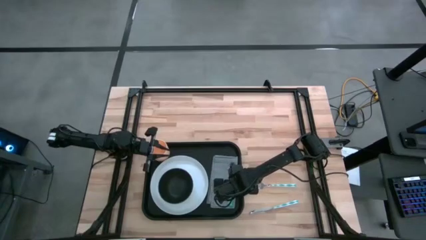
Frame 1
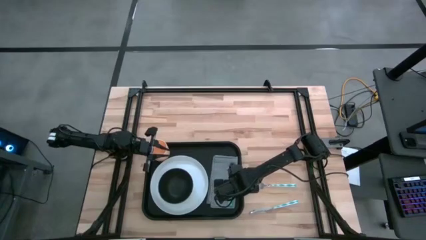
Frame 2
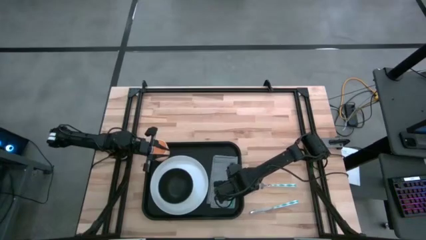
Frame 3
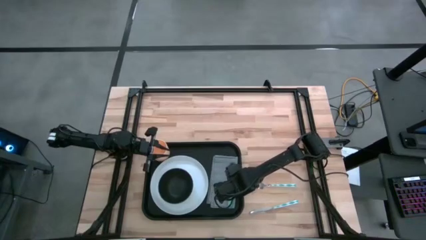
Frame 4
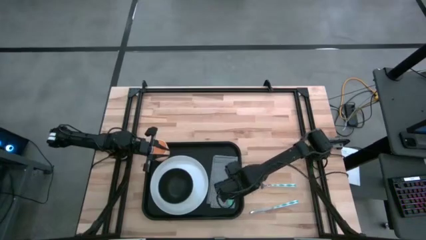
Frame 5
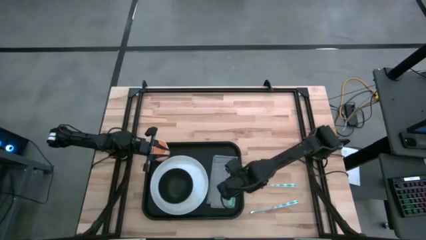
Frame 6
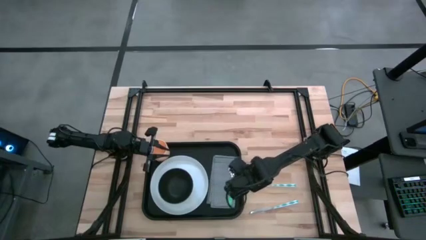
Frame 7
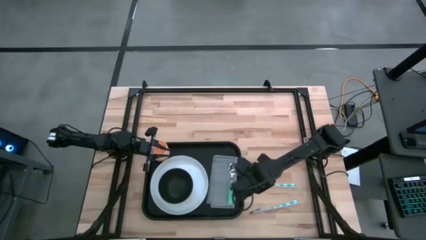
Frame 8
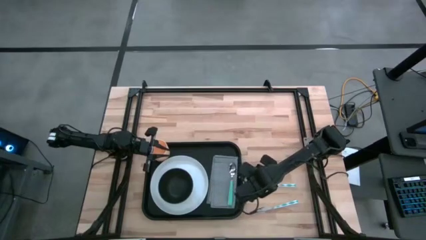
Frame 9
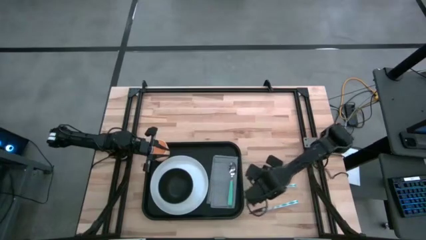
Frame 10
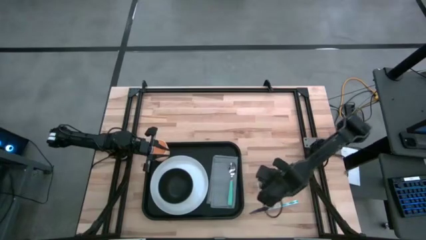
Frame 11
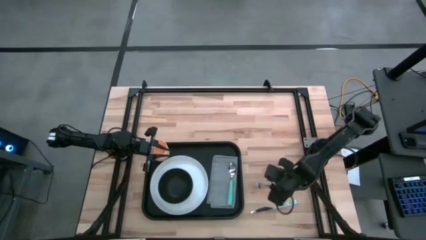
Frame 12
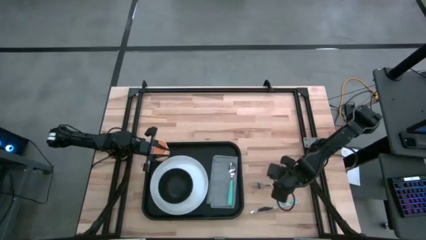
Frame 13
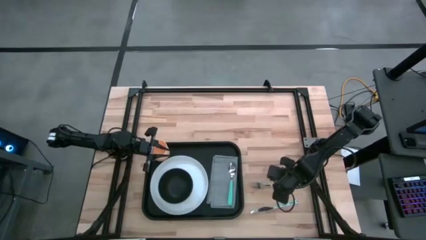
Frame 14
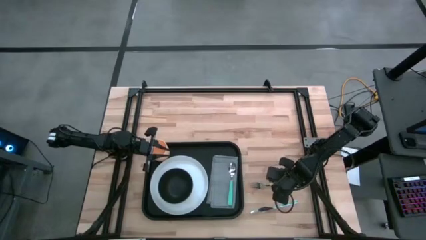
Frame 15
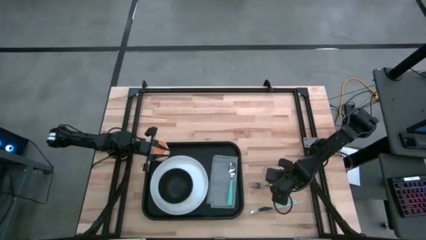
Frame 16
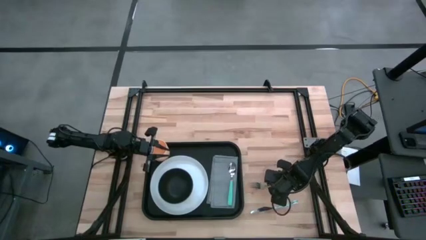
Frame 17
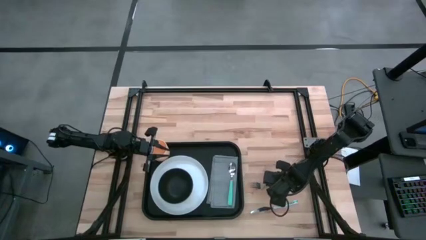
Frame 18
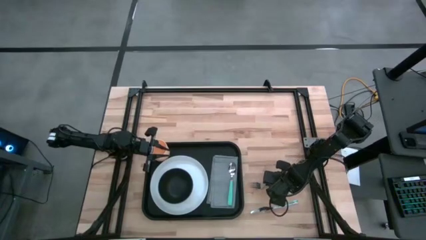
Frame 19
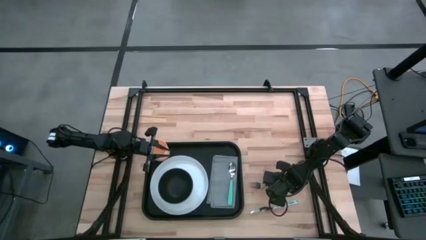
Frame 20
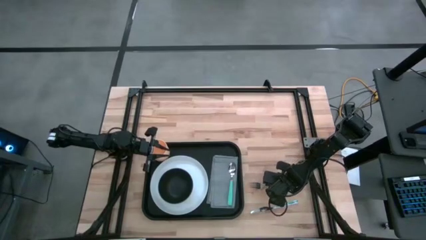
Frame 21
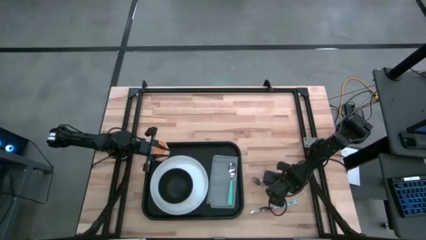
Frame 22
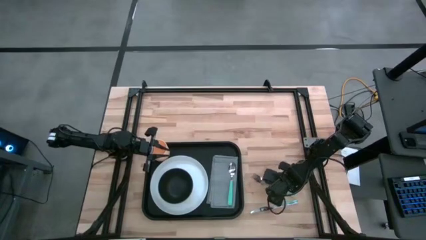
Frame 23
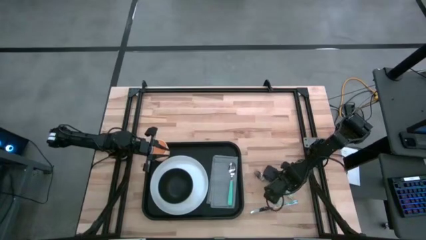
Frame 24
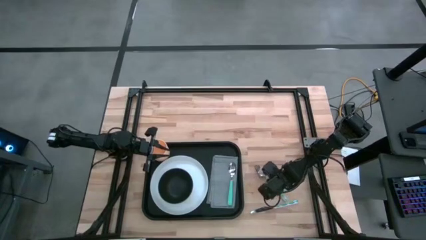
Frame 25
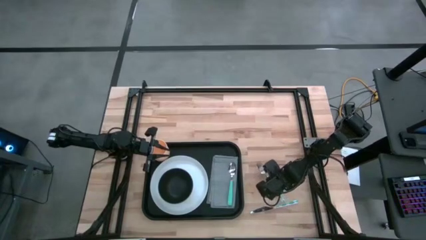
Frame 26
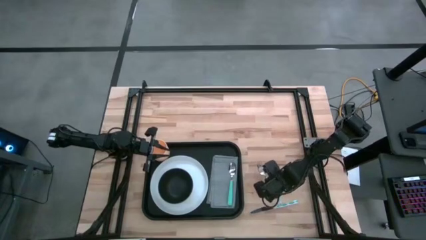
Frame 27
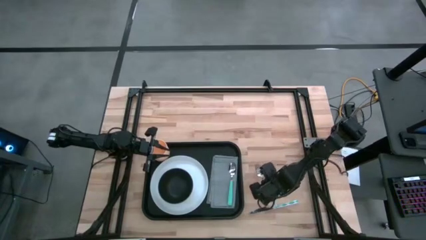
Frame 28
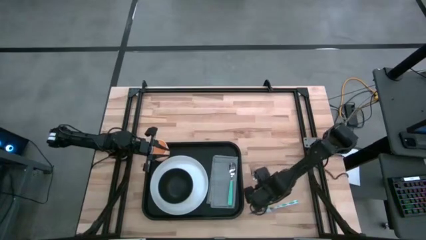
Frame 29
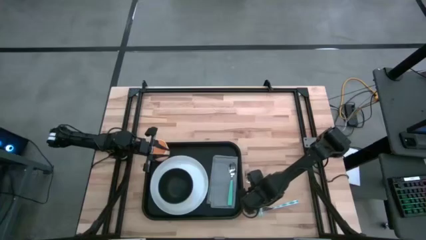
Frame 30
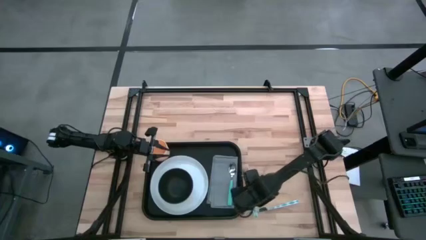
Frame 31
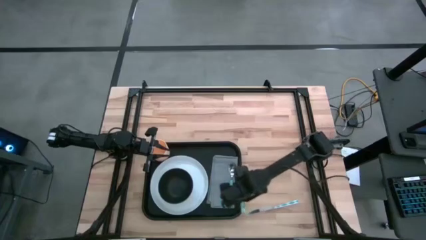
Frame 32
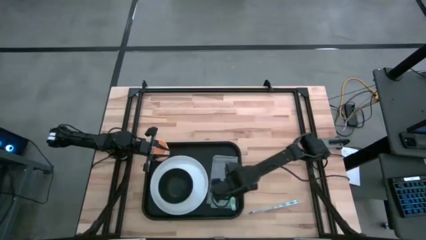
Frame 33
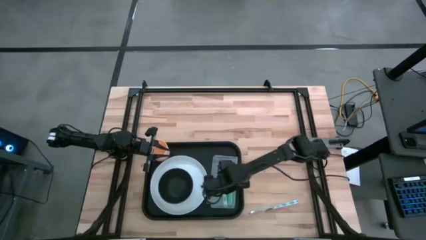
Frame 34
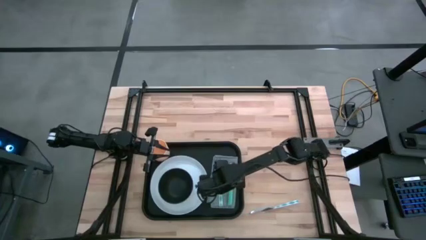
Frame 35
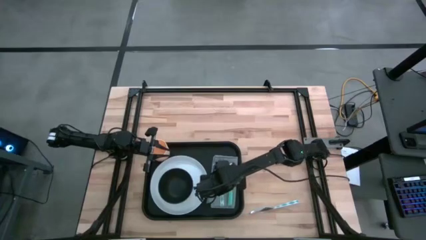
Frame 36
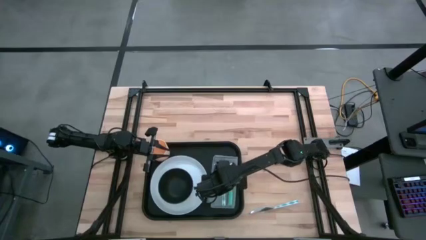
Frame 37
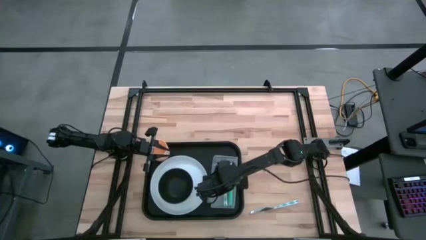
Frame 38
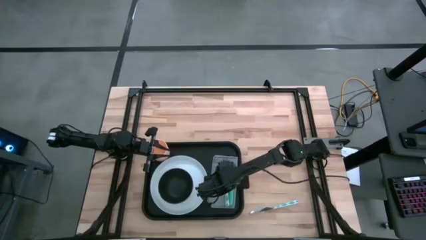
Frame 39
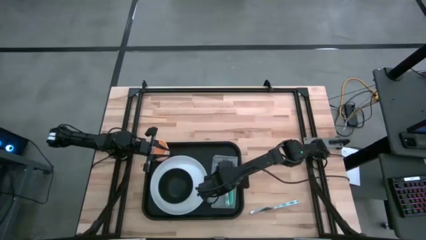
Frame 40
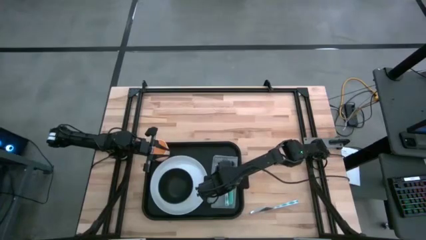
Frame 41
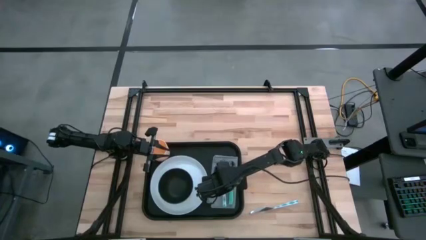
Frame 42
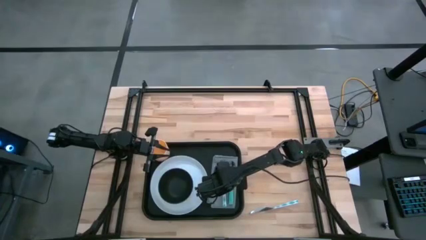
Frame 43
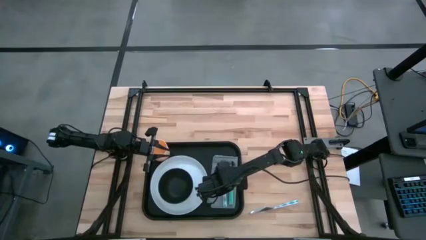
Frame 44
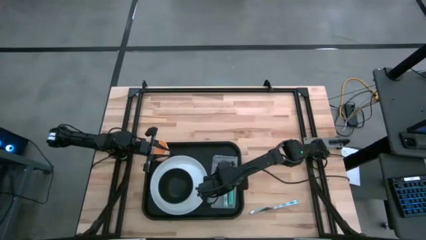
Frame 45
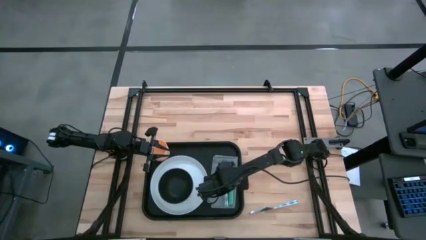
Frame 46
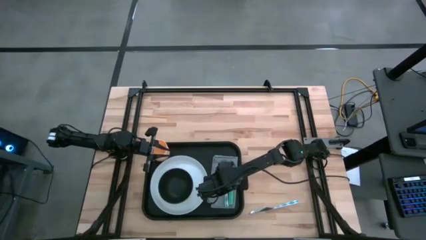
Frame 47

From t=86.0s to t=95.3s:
Task: Set up tray
Put the green fork to the left of the green spoon on the gray napkin on the black tray

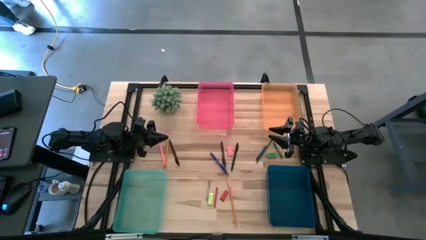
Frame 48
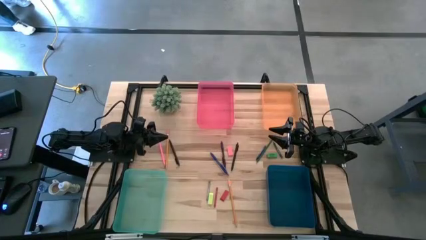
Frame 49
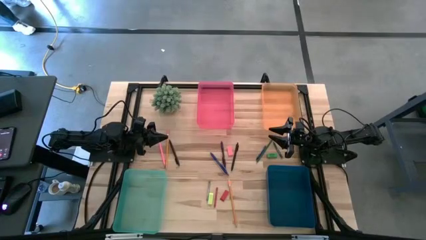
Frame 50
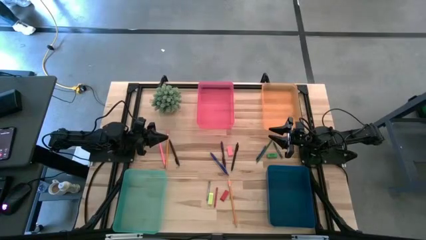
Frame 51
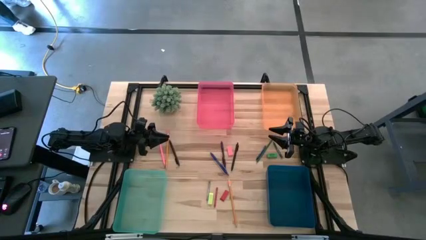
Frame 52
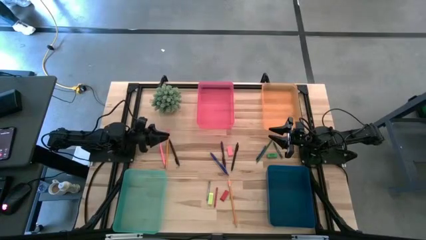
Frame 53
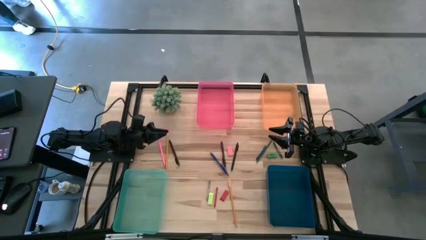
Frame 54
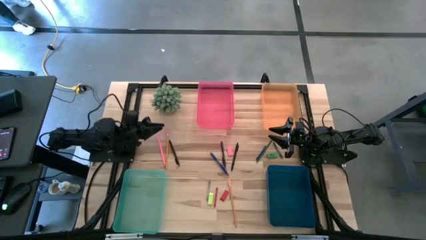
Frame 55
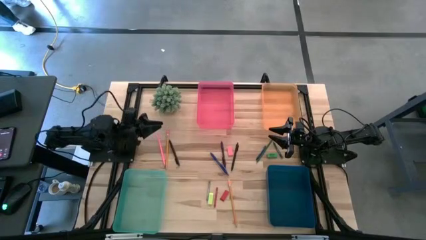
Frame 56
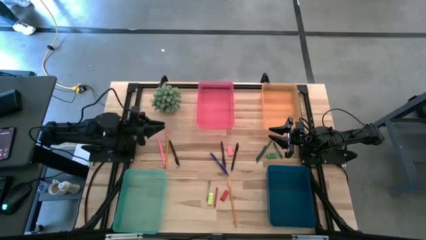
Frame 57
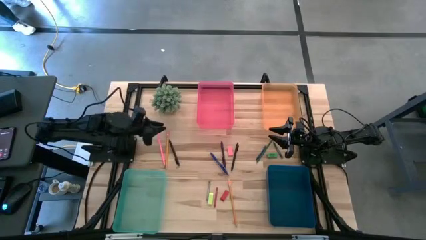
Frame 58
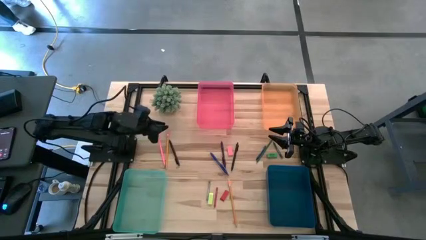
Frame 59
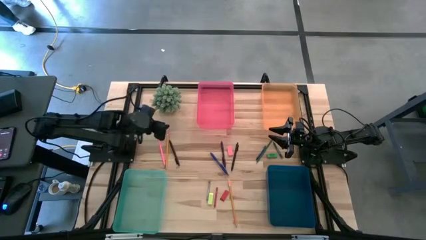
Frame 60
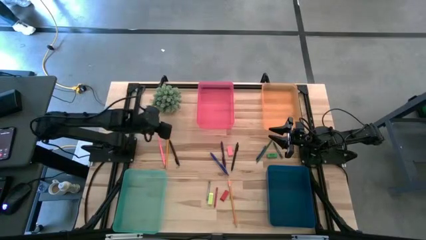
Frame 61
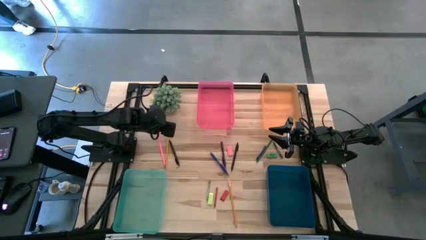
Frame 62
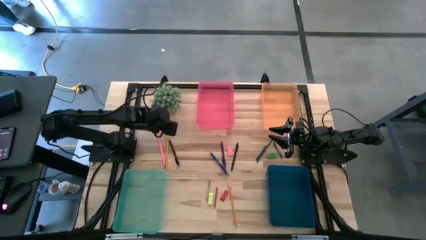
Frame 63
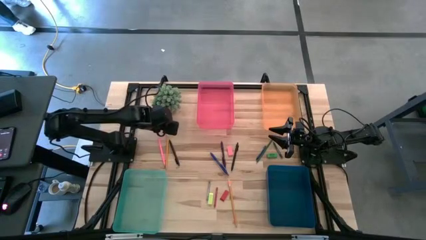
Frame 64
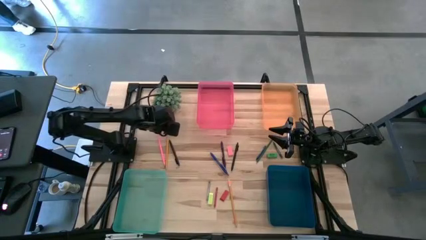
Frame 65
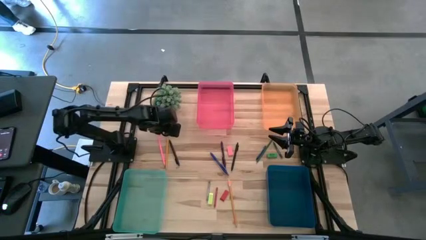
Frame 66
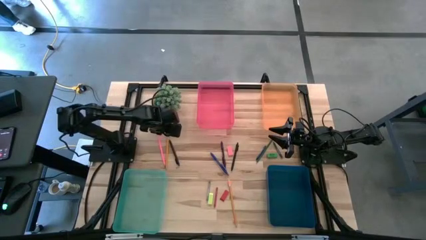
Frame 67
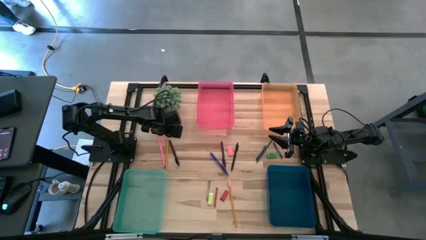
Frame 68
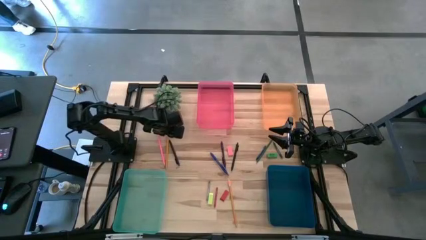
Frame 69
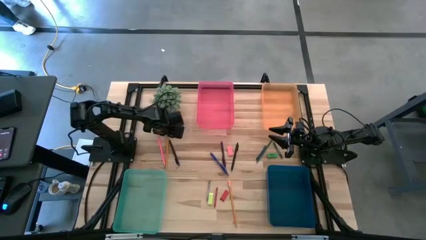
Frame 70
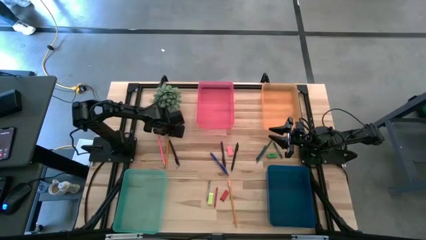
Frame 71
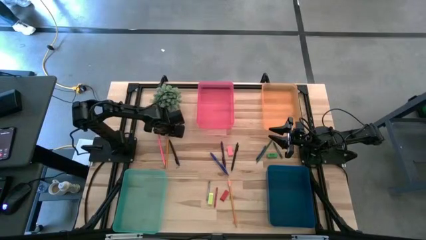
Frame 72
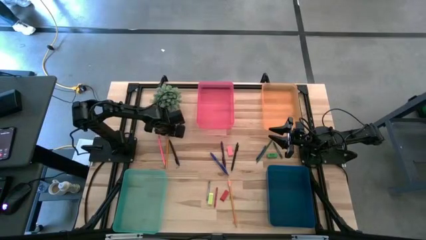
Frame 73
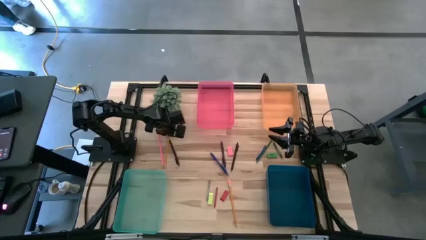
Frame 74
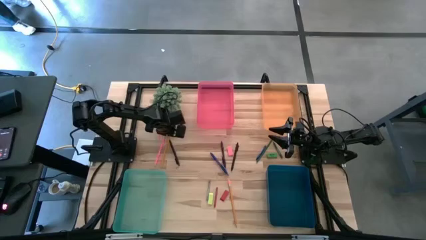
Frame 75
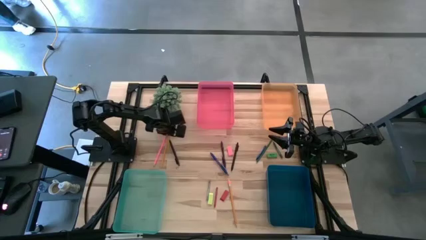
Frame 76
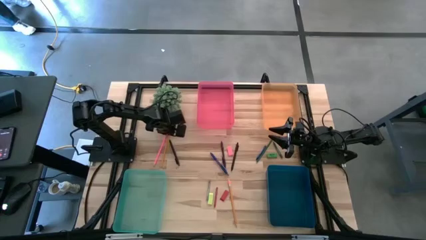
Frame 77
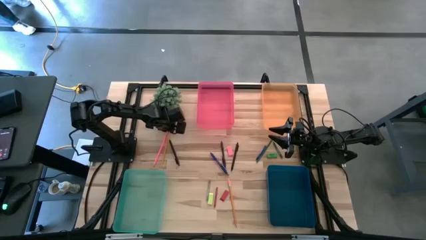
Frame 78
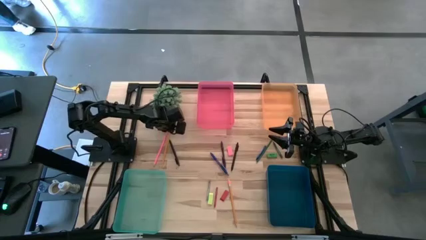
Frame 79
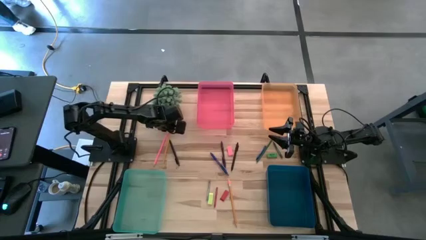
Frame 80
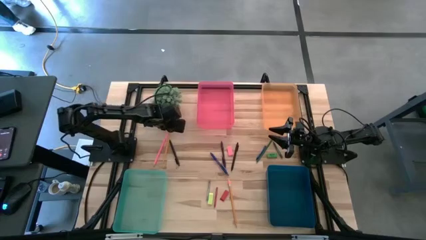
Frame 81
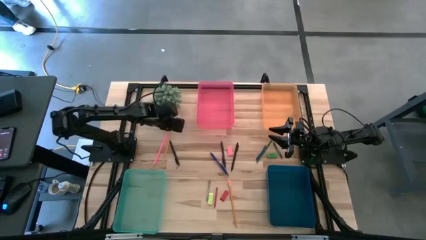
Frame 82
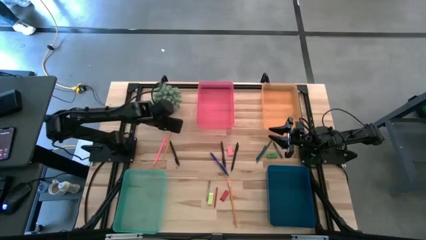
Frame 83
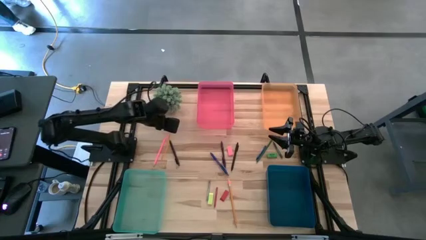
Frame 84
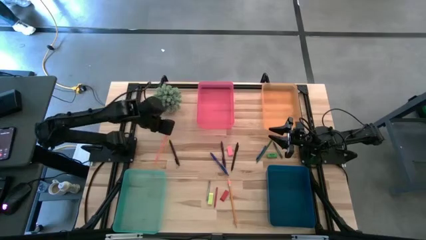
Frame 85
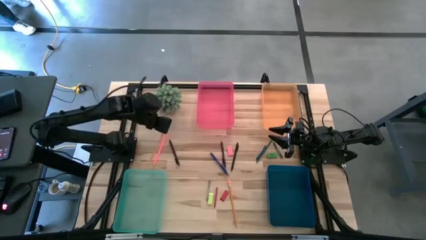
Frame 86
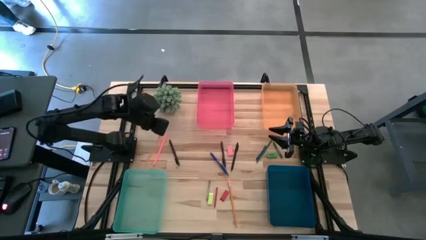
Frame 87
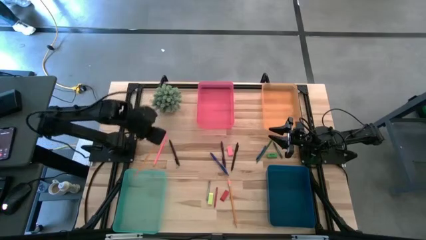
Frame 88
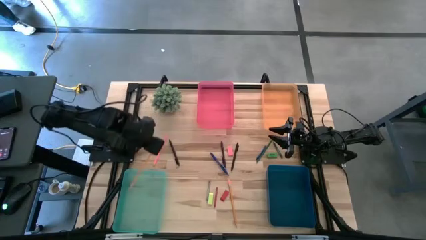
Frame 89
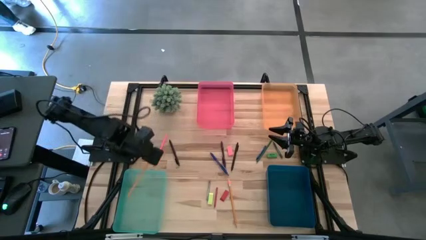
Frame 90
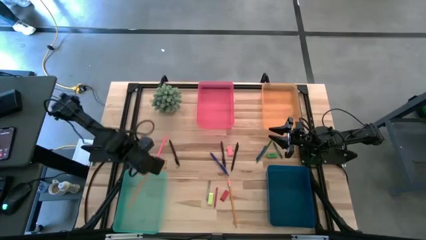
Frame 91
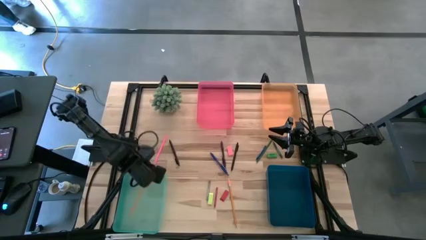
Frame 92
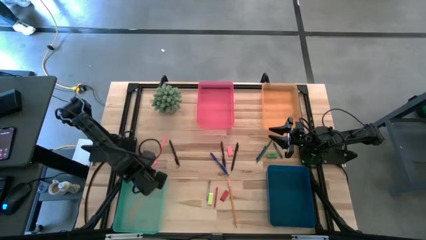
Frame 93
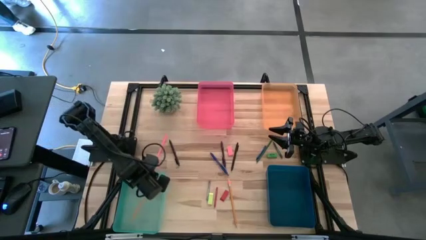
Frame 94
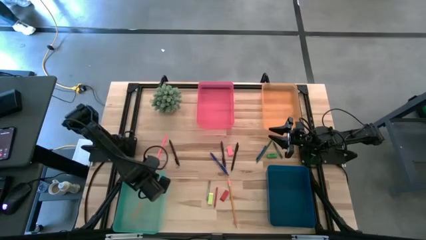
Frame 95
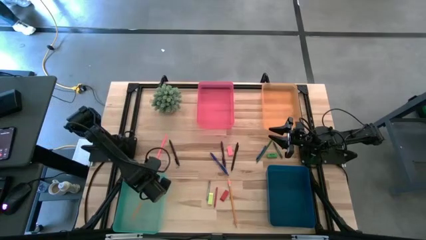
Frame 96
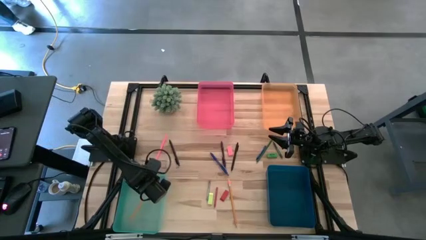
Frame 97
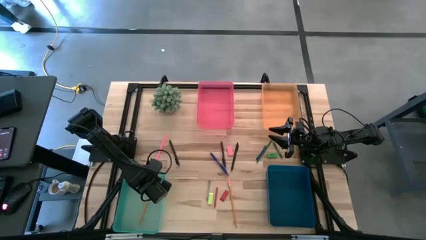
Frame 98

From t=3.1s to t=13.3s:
Task: Sort crayons/erasers/pens/pencils in bins
Put the top orange pencil into the green bin
